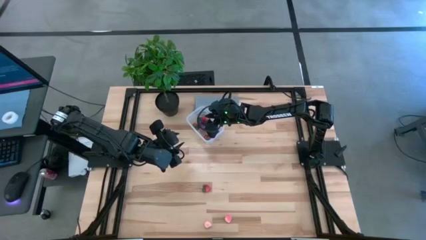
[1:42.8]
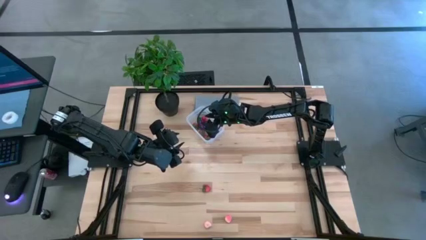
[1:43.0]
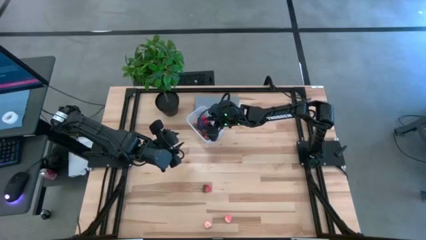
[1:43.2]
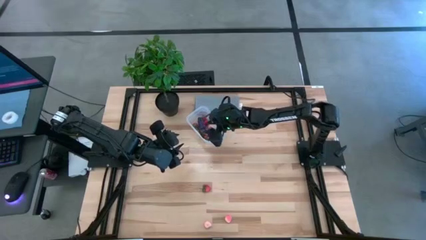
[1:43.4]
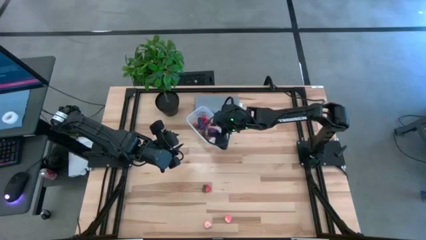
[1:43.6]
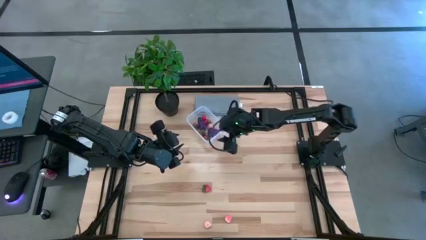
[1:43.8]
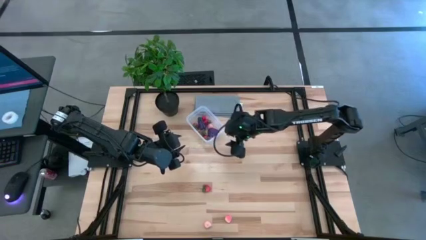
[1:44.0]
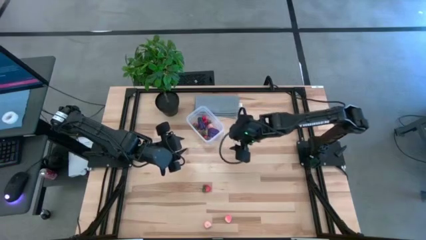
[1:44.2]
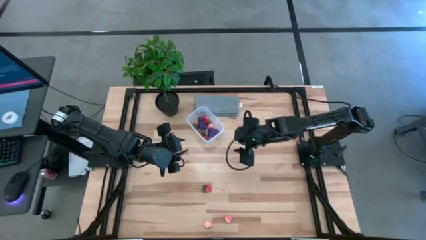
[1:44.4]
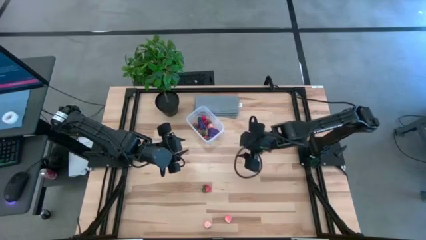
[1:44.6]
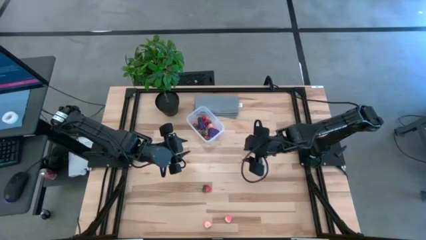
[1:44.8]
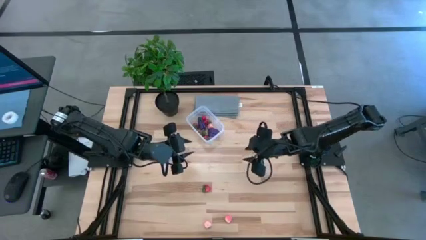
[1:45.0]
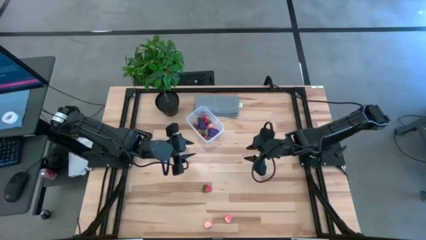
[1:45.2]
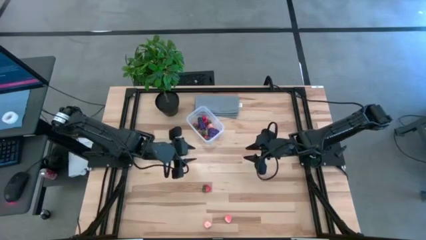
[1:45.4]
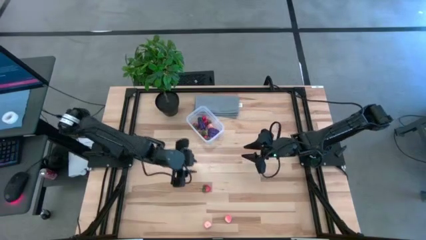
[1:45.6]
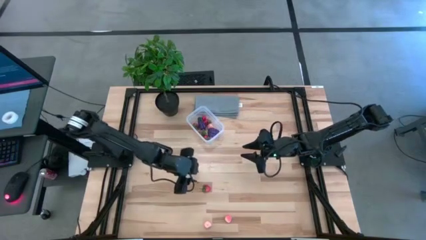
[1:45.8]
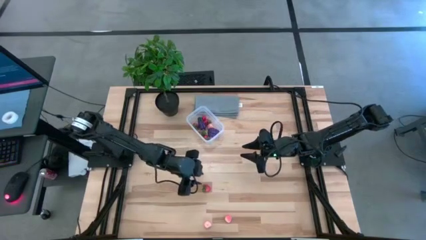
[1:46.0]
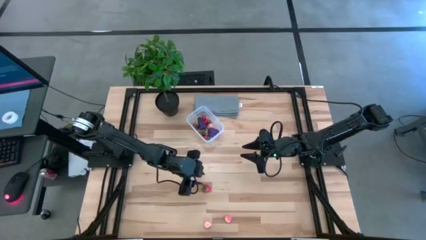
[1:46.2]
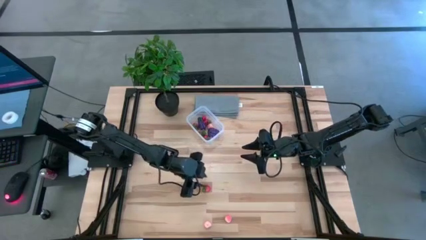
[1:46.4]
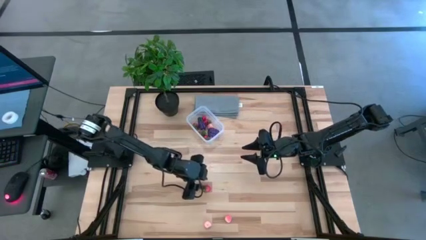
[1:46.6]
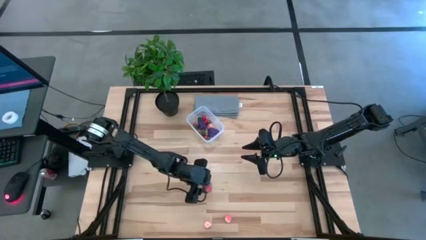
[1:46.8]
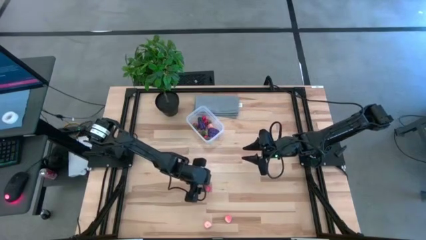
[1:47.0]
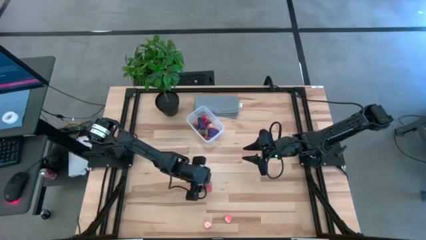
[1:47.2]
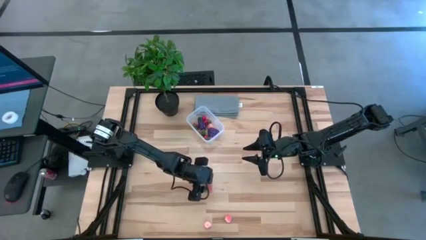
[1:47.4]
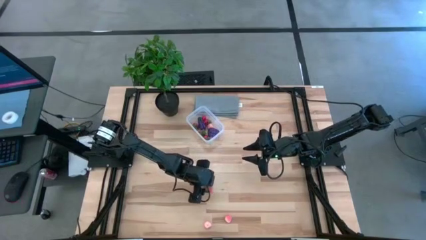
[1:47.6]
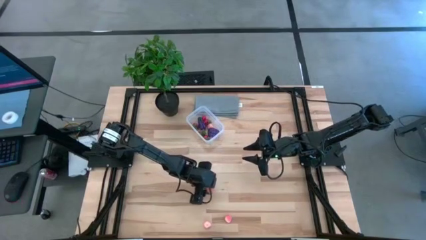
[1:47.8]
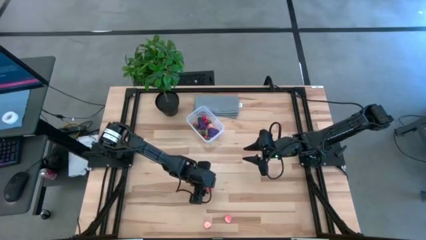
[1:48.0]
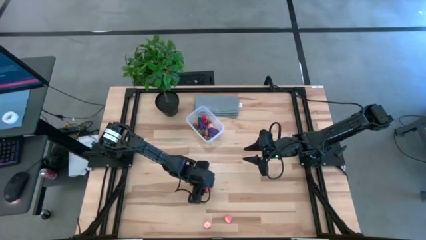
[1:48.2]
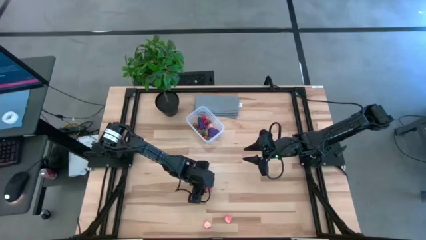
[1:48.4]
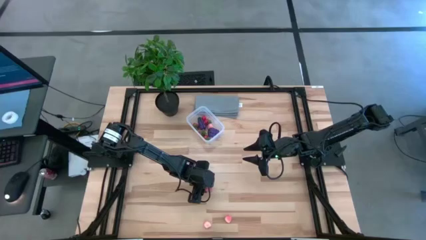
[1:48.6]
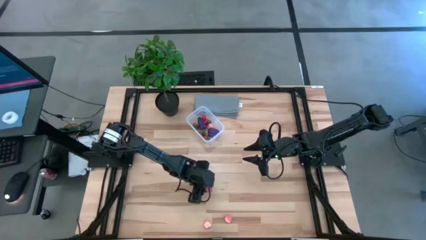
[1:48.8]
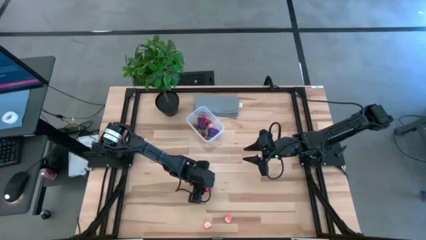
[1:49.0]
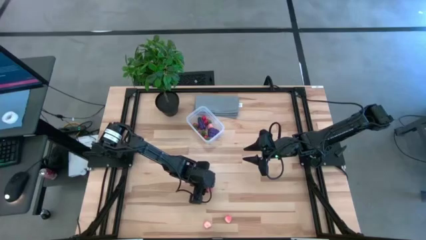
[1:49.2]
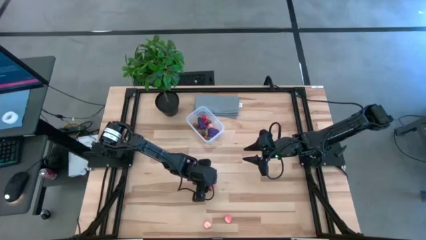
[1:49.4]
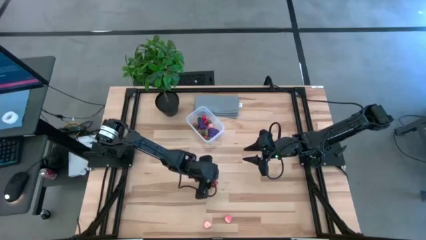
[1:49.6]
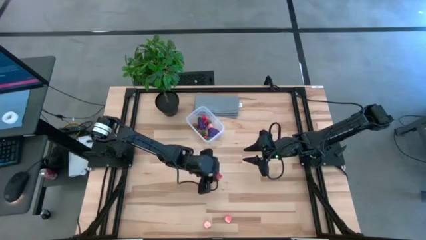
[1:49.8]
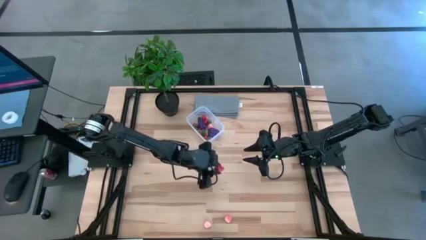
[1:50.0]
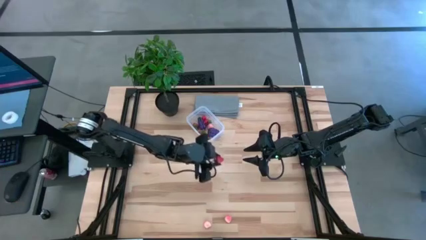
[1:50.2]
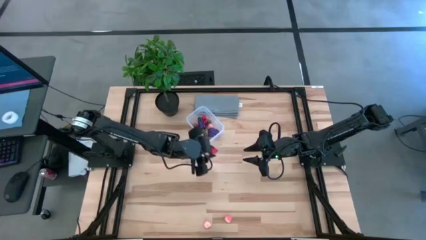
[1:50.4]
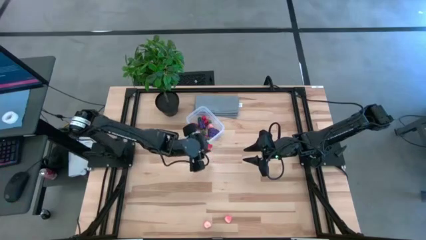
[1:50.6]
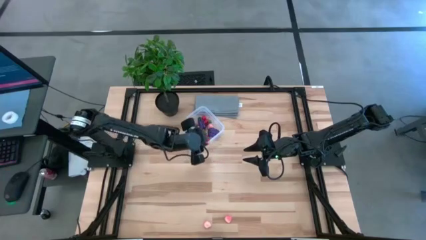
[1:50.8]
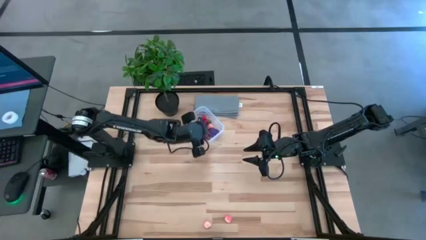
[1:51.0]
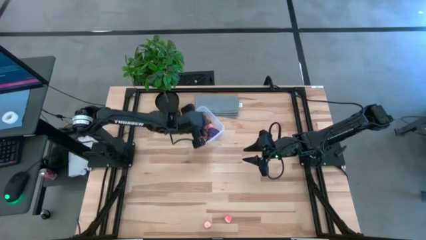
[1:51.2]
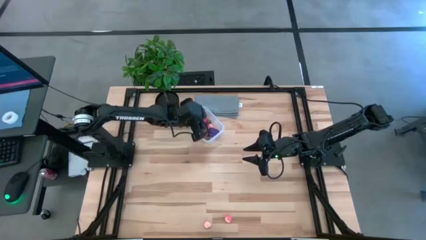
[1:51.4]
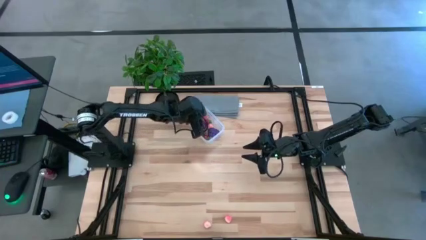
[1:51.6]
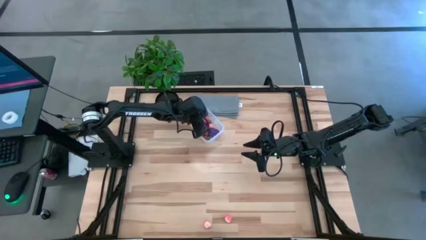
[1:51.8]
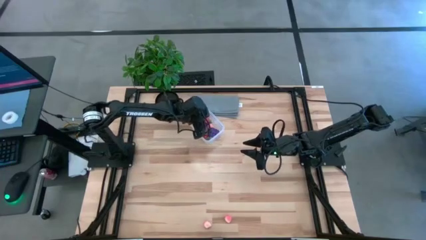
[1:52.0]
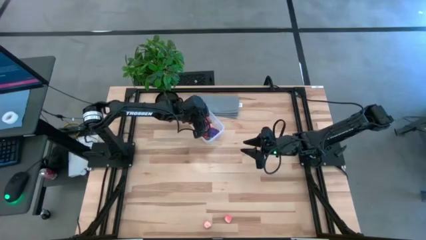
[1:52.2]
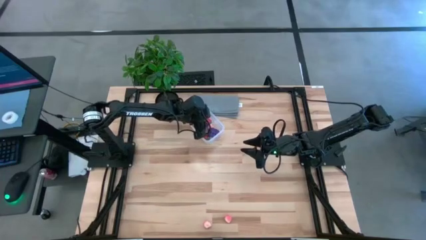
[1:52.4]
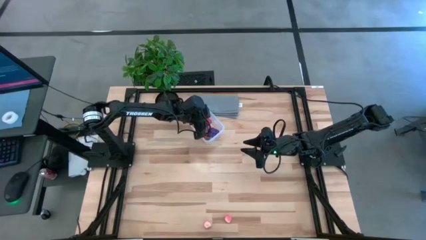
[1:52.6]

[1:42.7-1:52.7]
Task: Pick and placing Produce into tupperware
Put the red strawberry into the transparent bin
